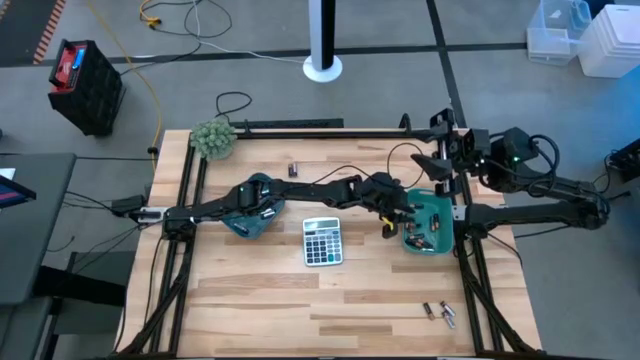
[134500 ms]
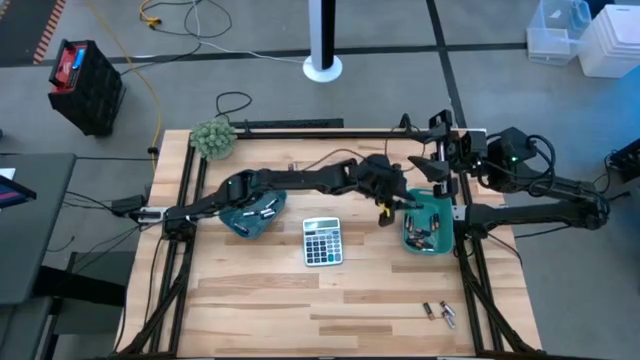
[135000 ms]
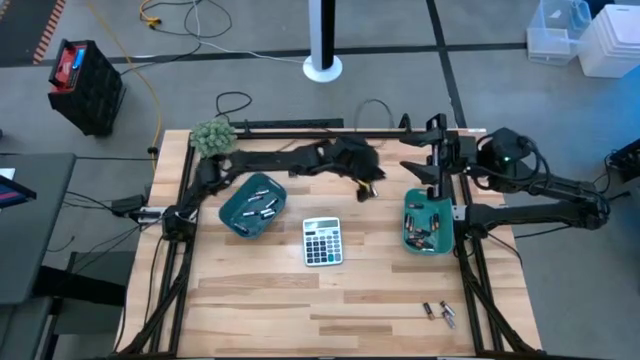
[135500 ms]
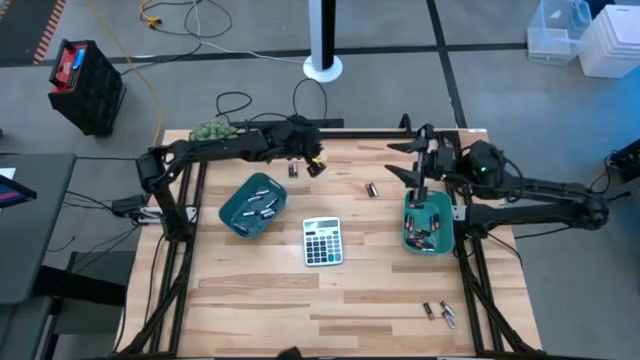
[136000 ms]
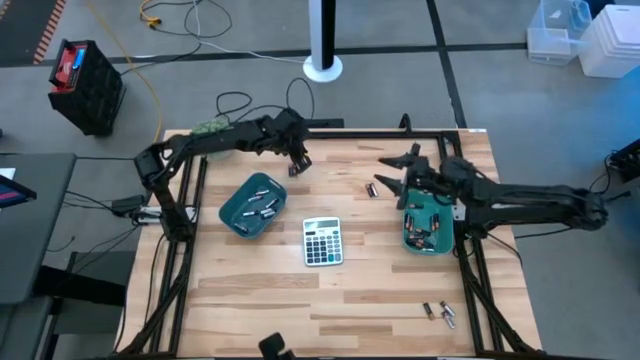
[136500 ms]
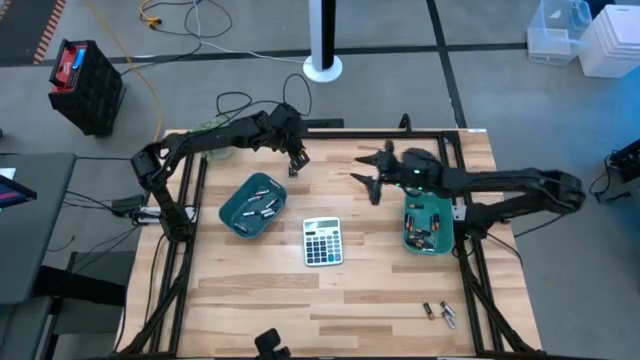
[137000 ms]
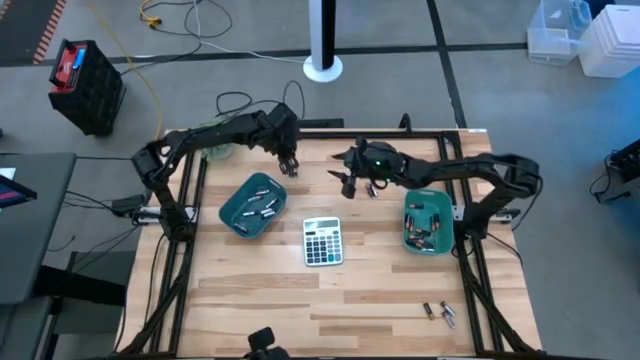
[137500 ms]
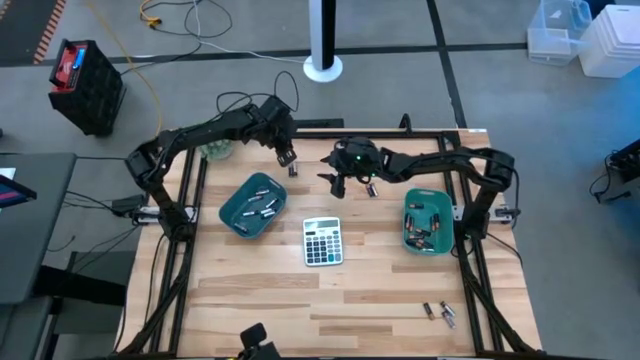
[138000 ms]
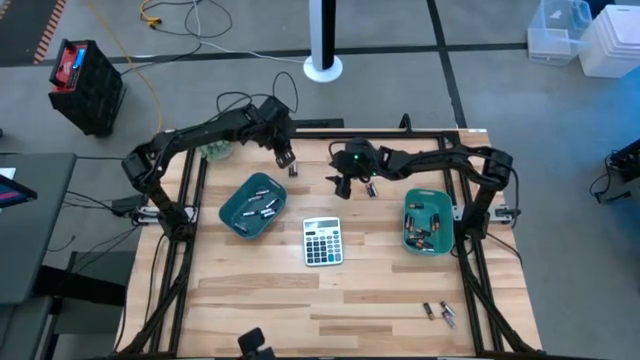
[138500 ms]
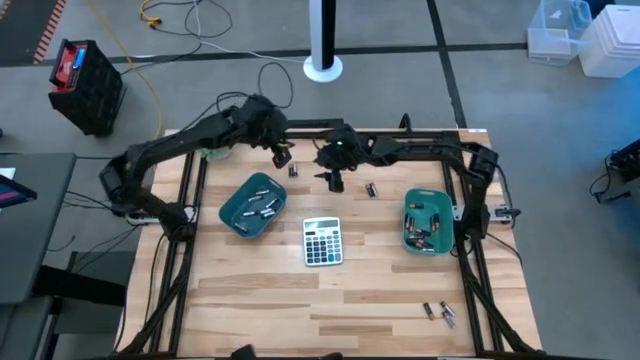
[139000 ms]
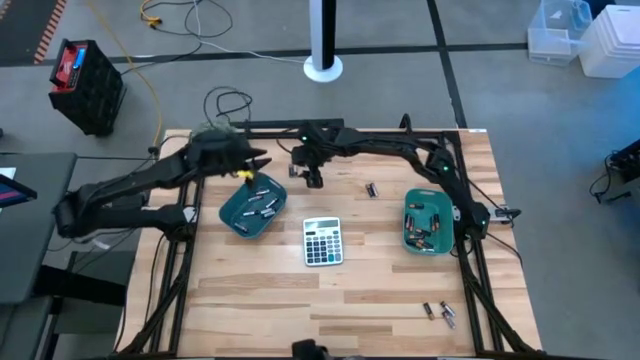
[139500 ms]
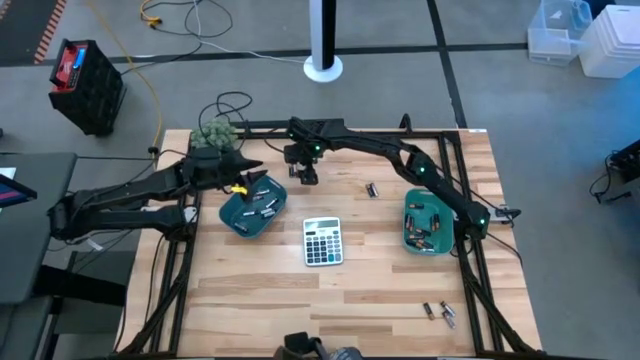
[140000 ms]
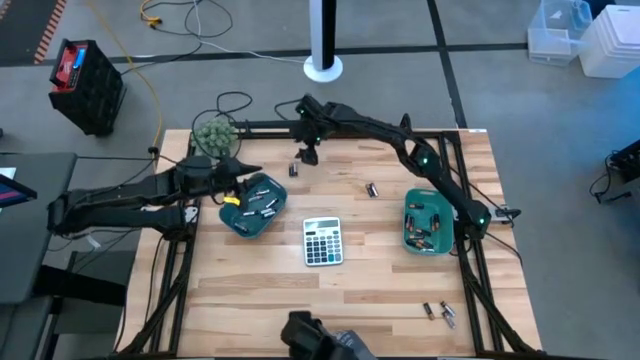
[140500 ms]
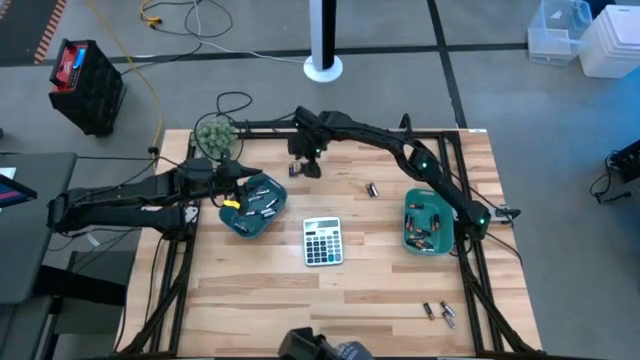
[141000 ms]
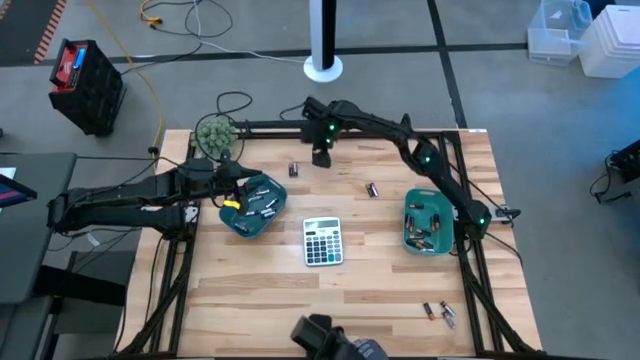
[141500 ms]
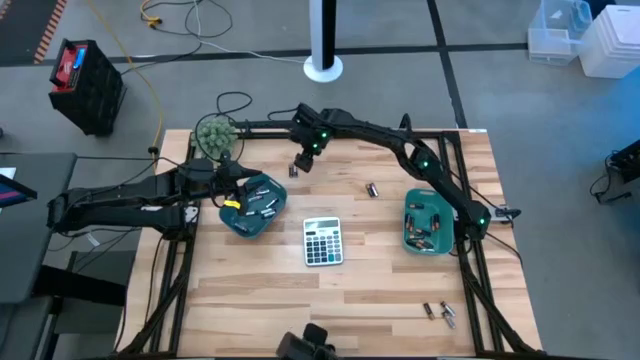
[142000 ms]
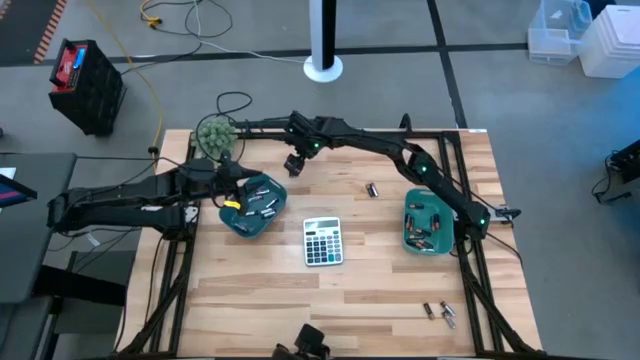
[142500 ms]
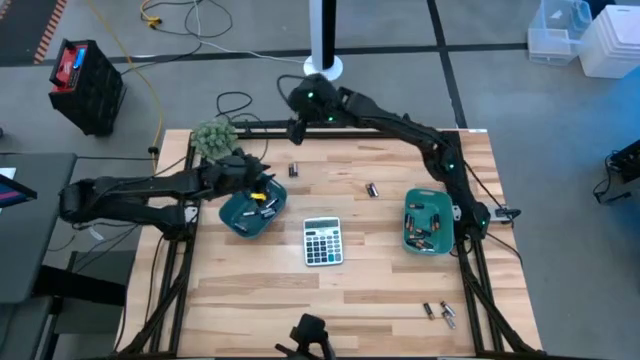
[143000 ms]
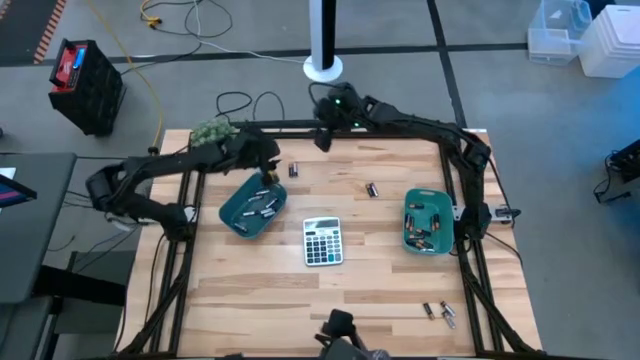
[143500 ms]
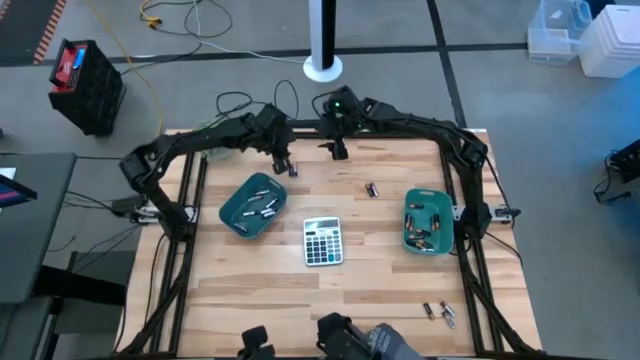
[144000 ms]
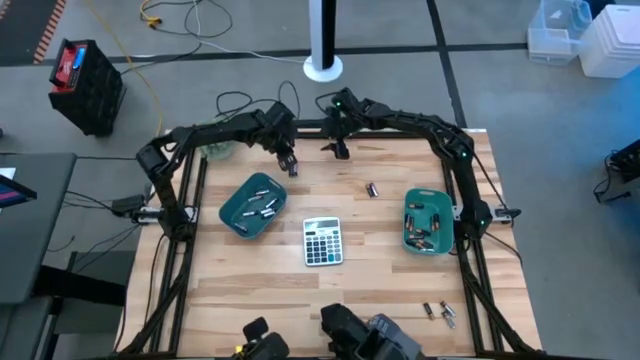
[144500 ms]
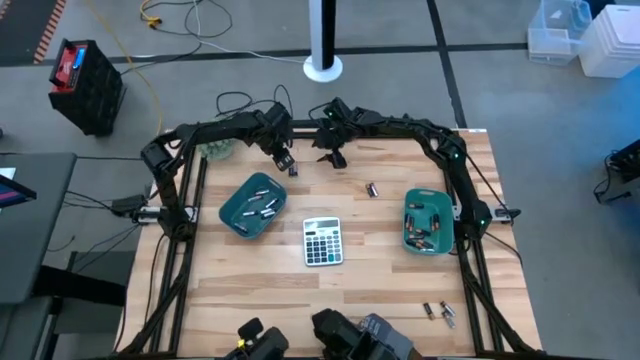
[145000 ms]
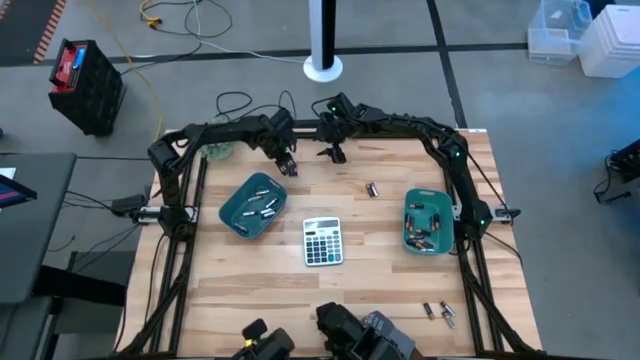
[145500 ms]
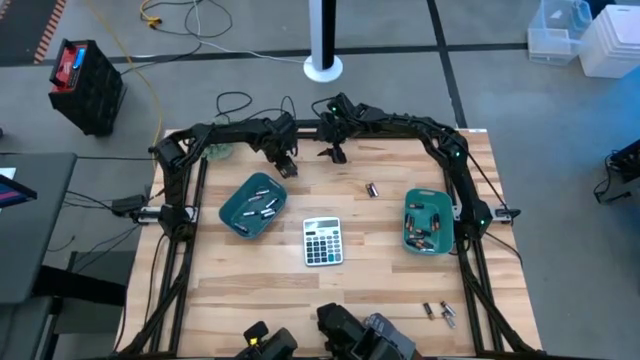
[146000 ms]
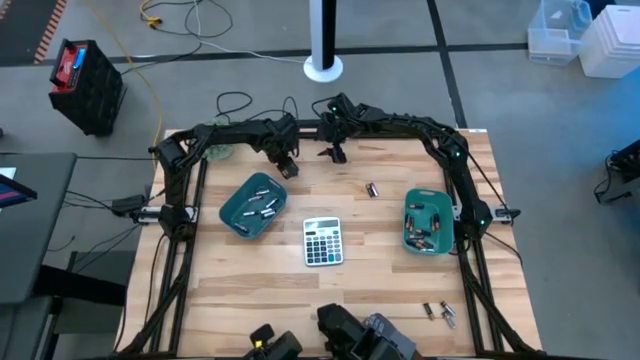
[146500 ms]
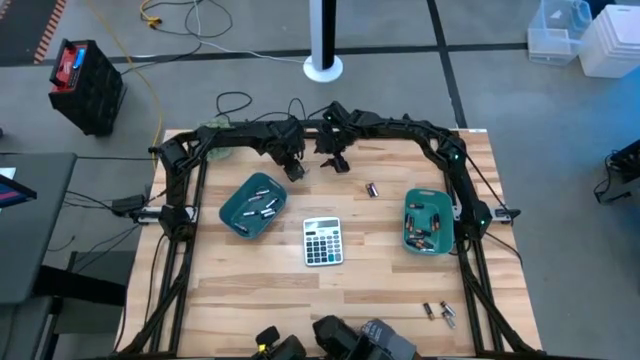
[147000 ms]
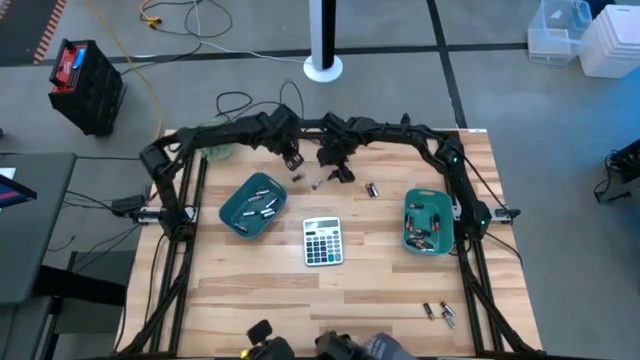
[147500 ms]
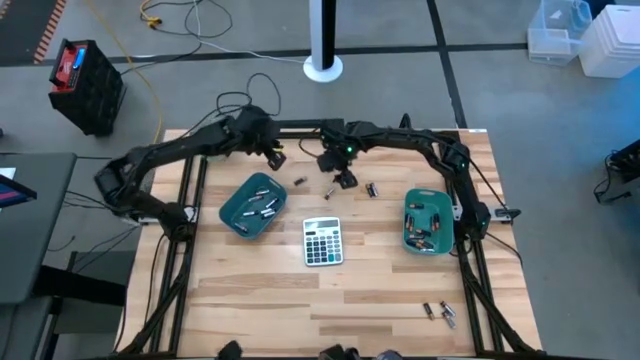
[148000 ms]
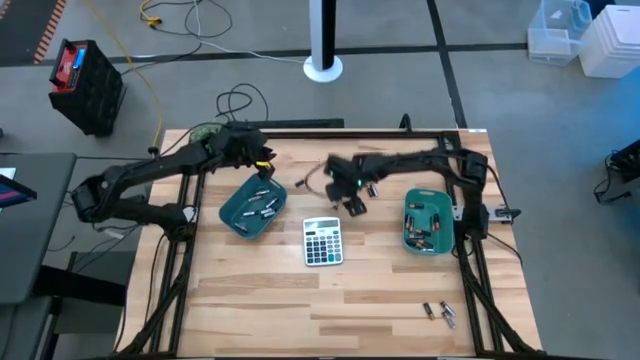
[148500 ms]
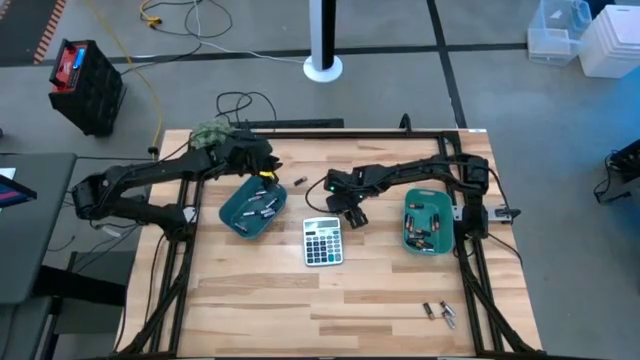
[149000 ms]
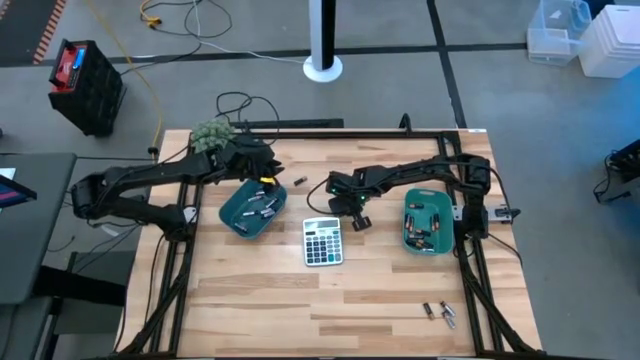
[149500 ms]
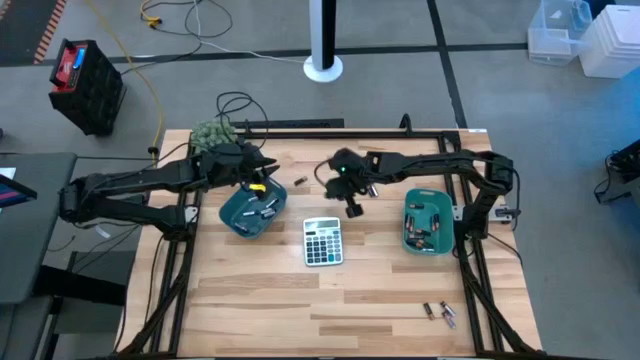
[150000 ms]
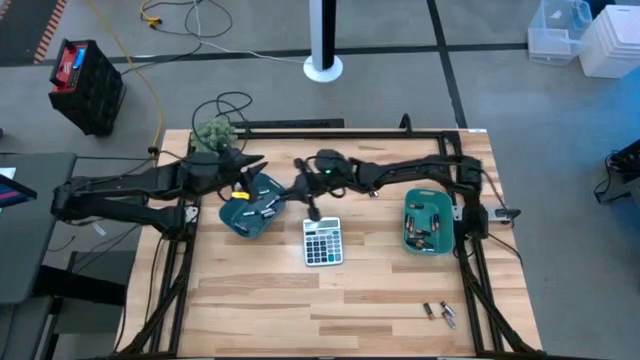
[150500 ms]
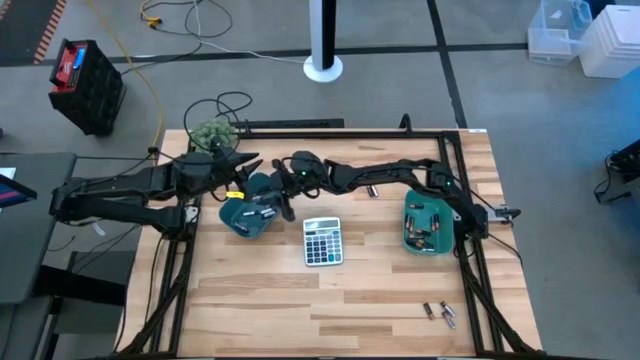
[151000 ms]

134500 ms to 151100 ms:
Task: Sort batteries
Put the silver/black battery into the blue bin

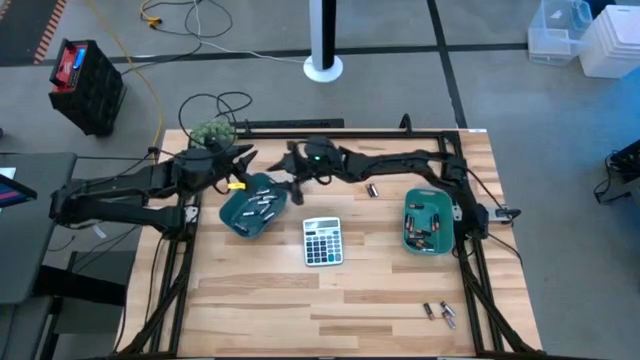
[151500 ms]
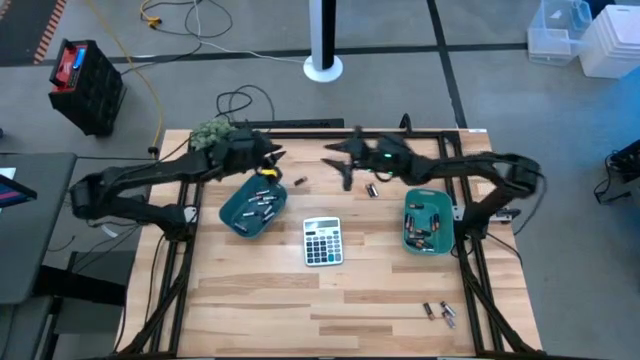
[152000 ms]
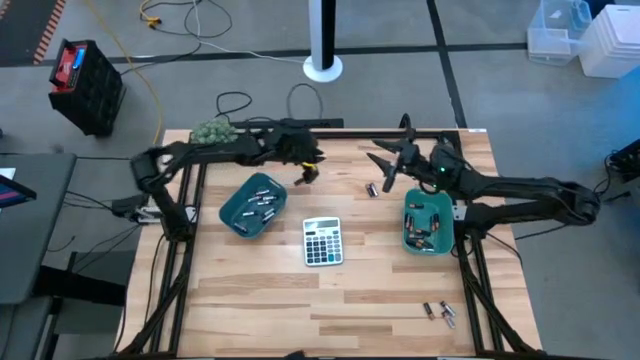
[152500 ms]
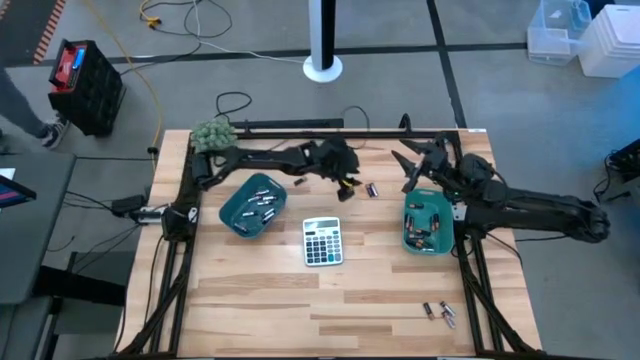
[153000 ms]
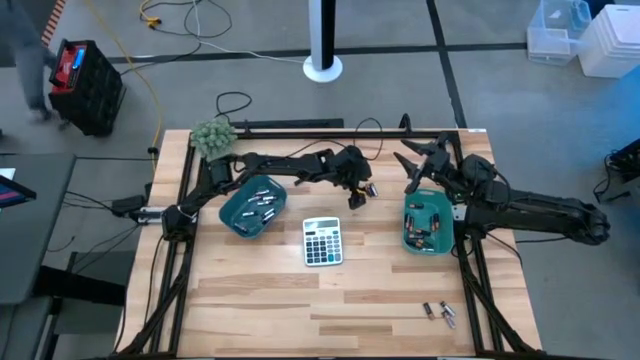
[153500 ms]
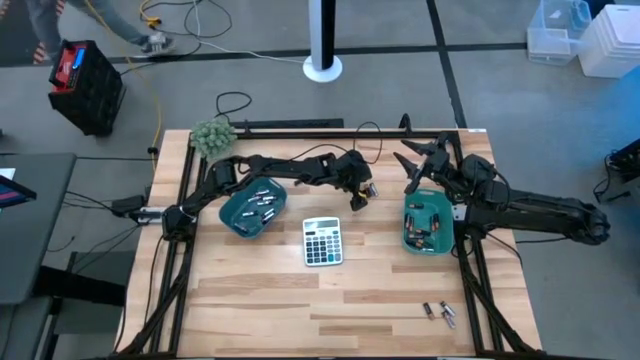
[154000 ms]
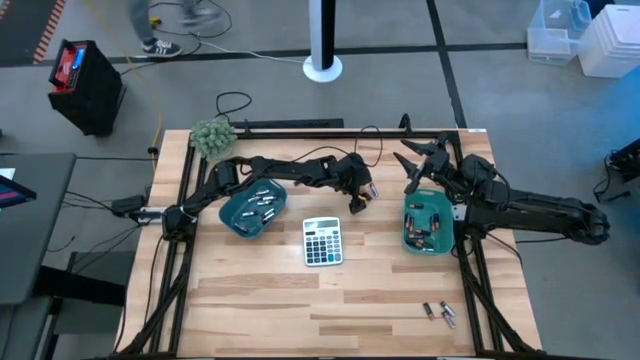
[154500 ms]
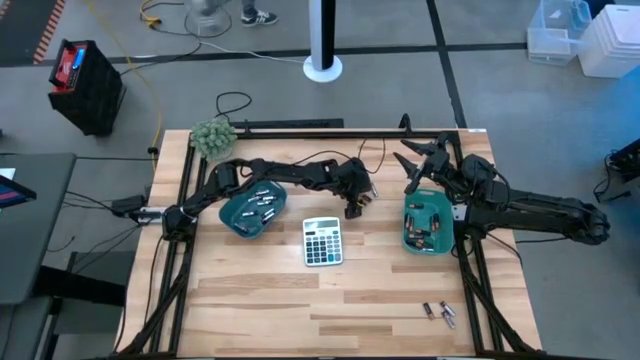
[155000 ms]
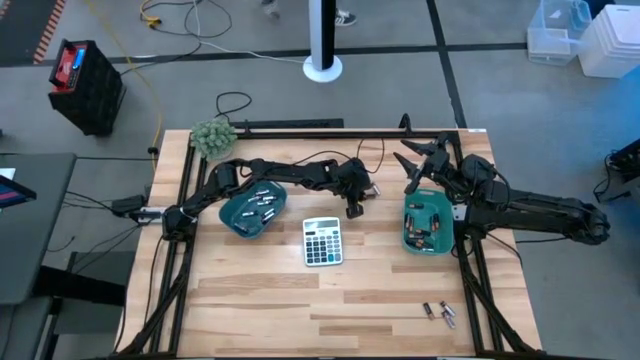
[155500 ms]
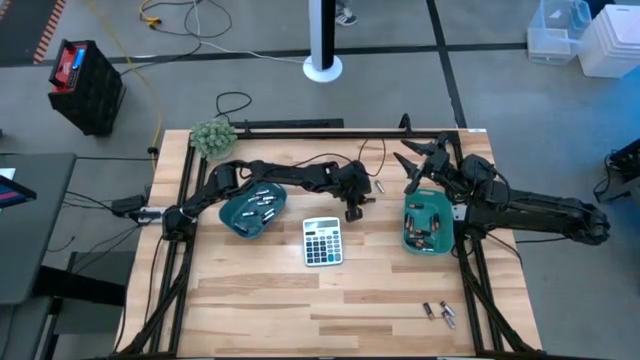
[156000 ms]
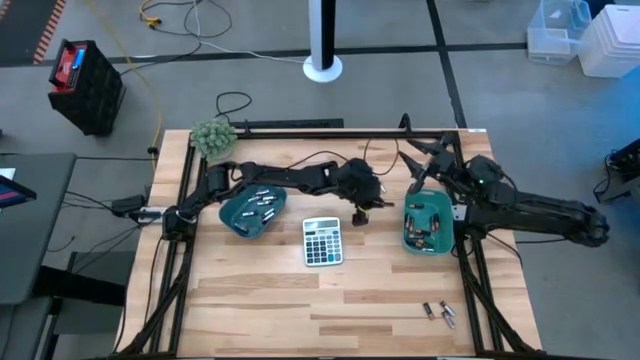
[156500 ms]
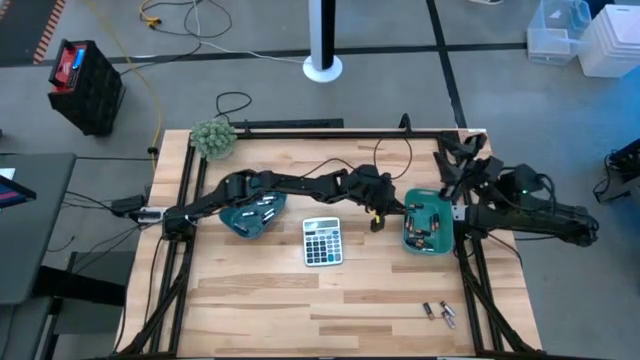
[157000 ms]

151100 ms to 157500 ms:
Put the brown/black battery into the green bin
